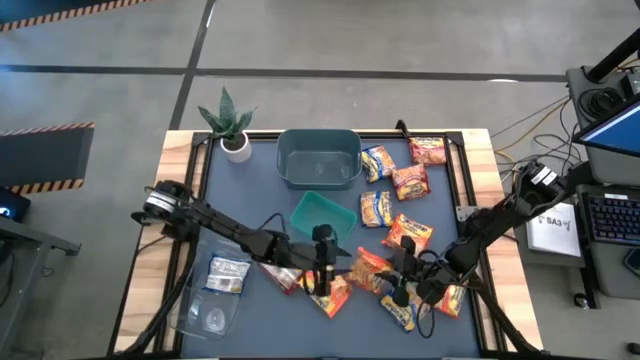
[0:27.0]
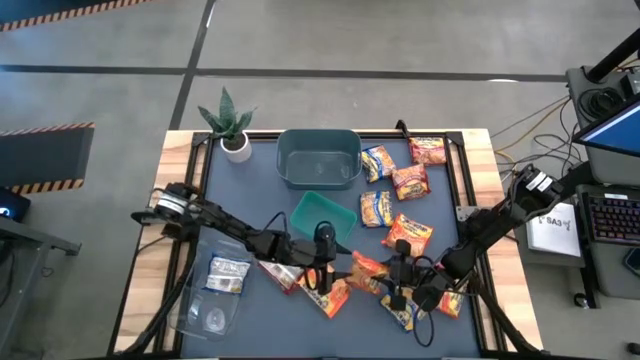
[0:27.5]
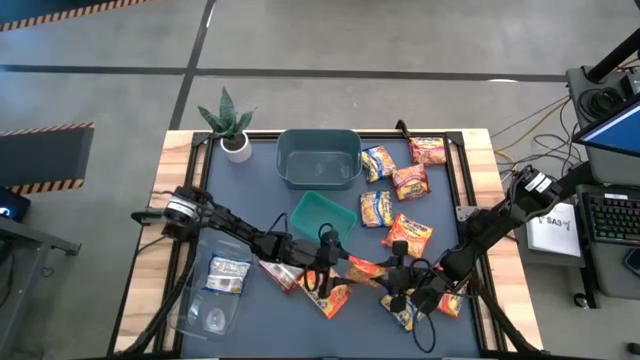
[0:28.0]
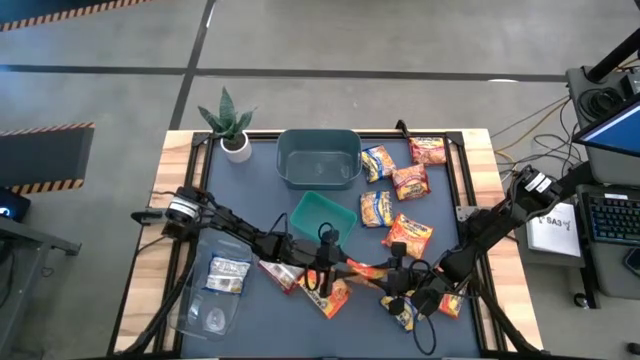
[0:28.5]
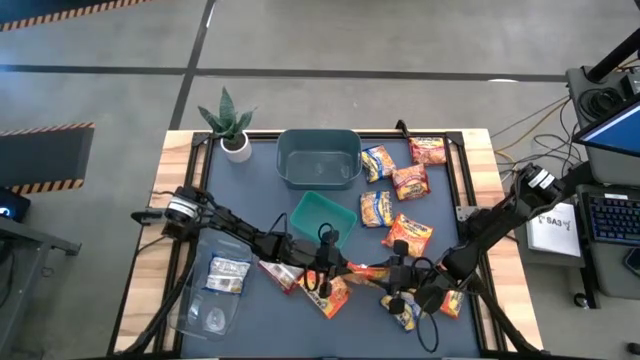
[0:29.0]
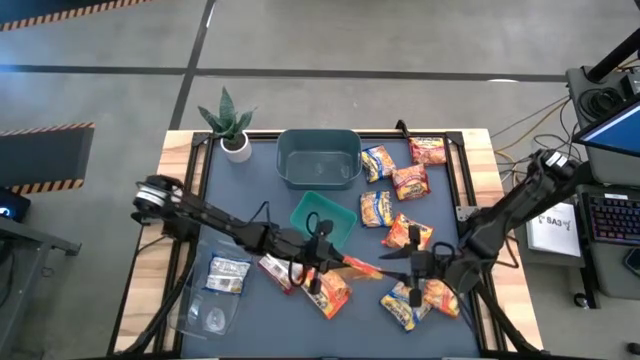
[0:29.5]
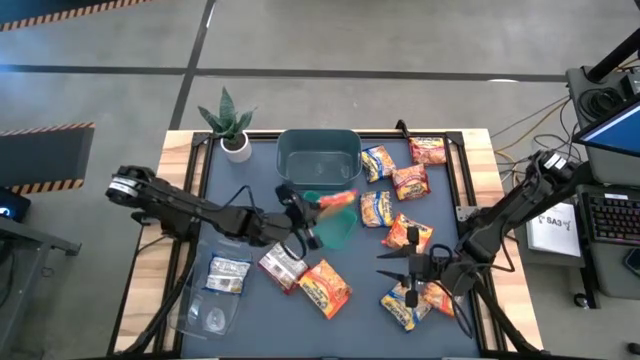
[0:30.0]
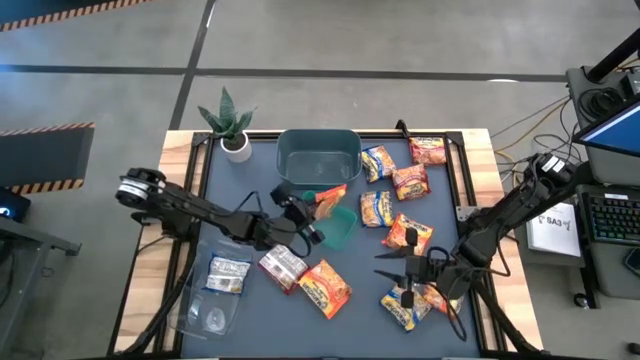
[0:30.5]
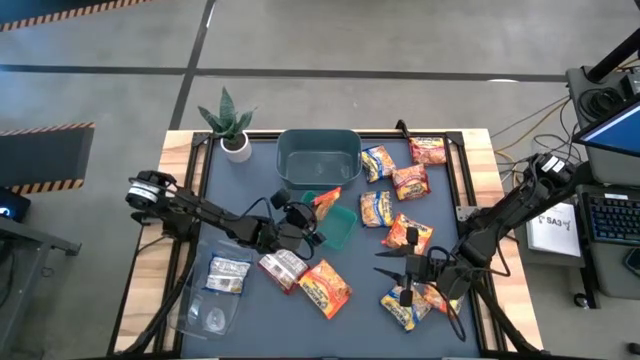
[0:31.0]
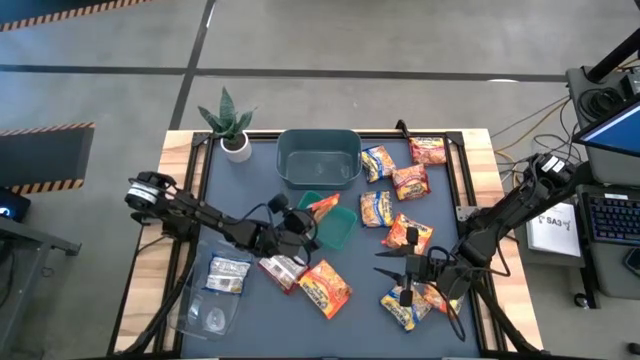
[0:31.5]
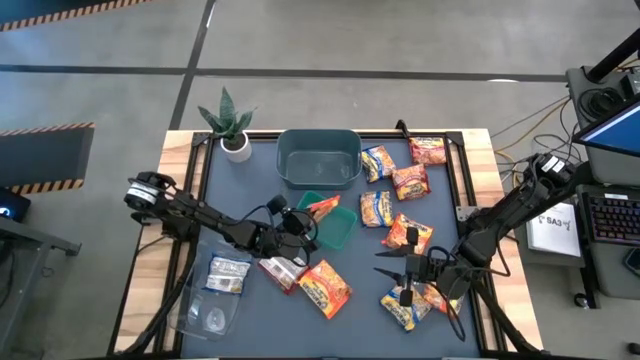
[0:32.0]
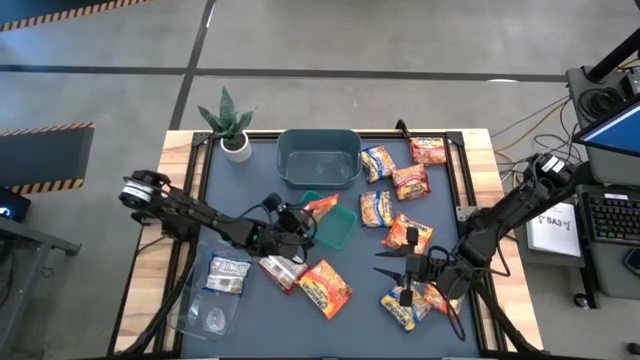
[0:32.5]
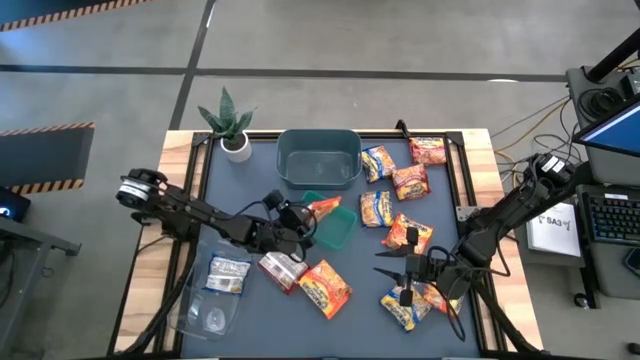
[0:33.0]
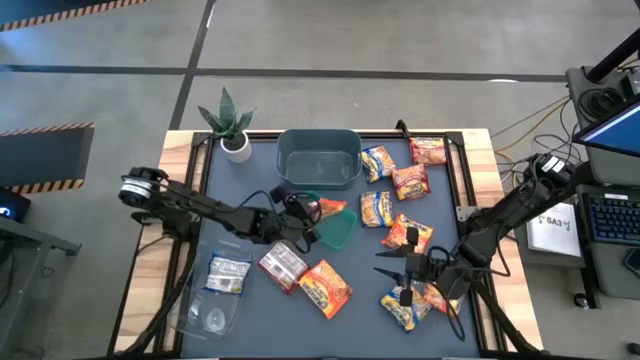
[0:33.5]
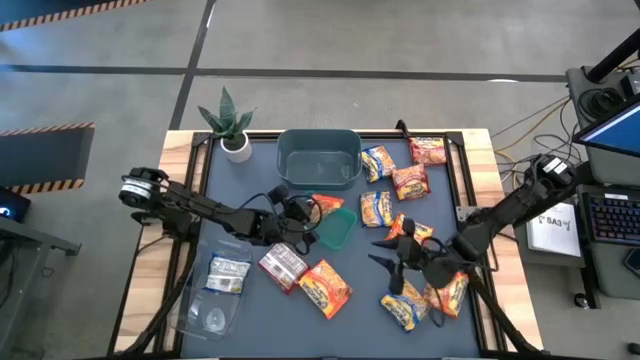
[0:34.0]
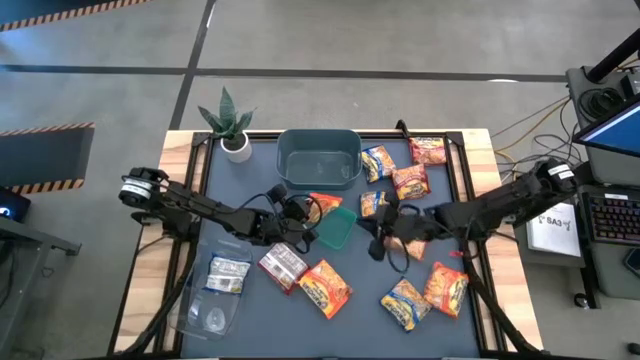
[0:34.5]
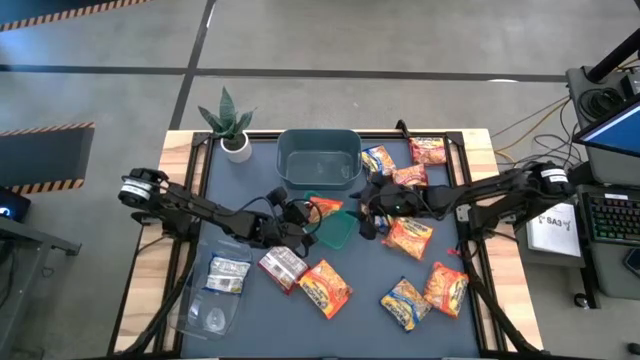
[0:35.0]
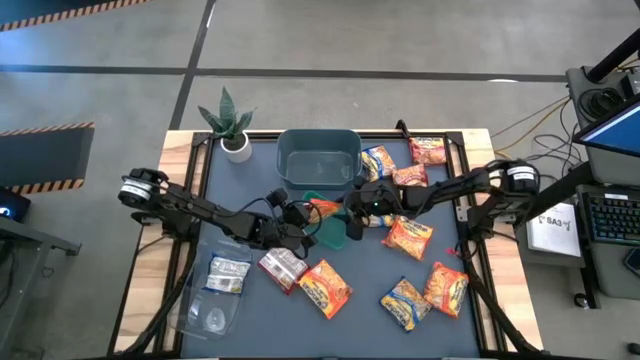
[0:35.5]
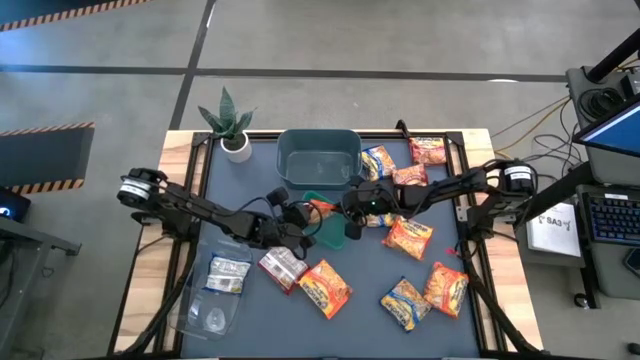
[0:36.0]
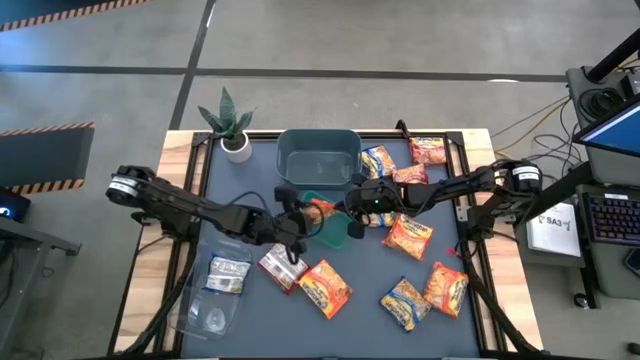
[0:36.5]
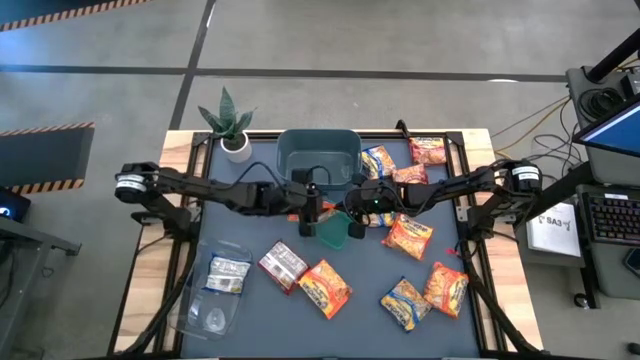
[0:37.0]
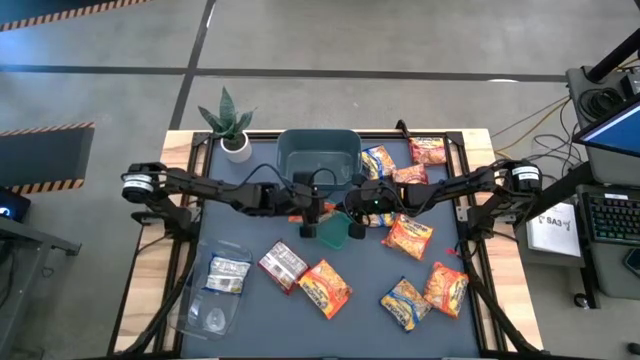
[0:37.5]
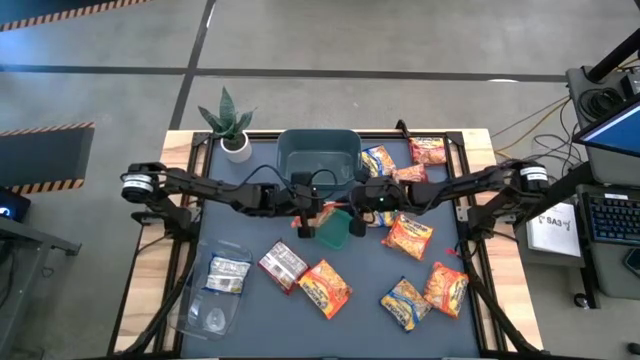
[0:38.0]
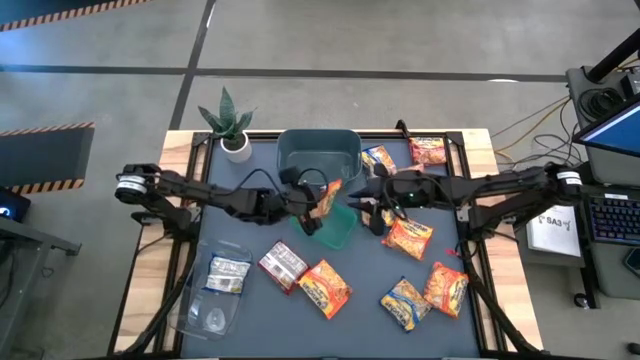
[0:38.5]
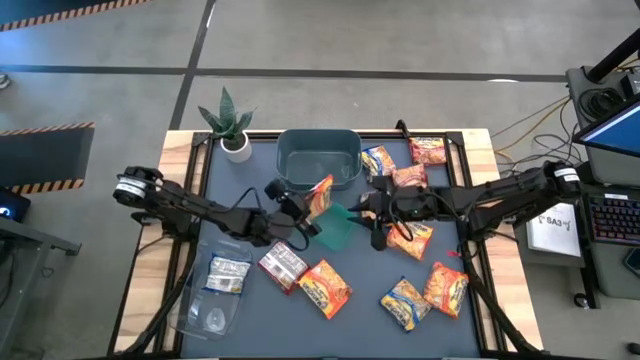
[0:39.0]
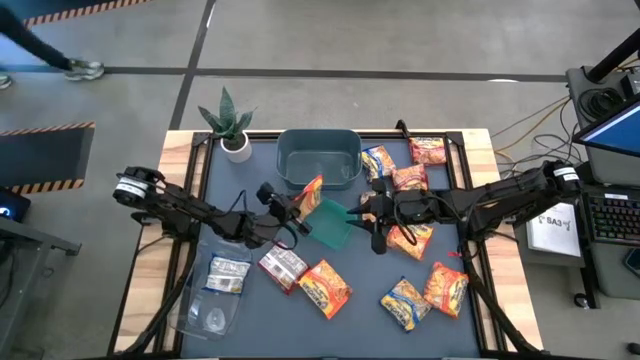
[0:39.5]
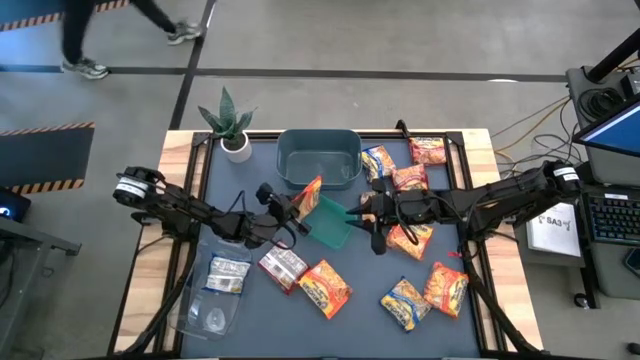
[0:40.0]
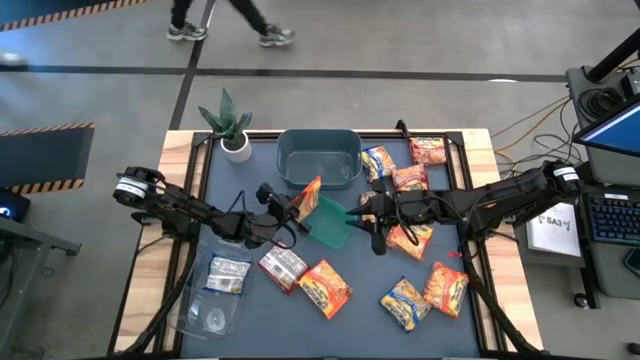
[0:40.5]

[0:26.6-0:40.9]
Task: Sort Maruchan noodles
Put the orange noodle pack into the green bin

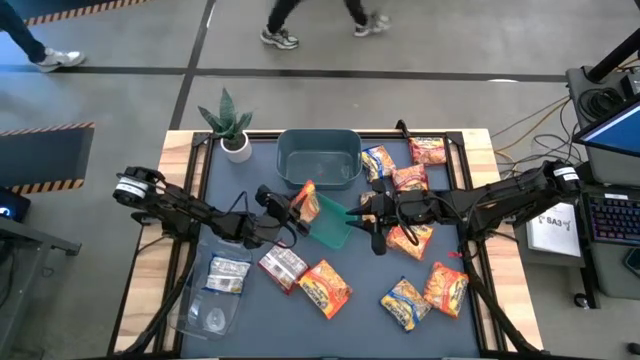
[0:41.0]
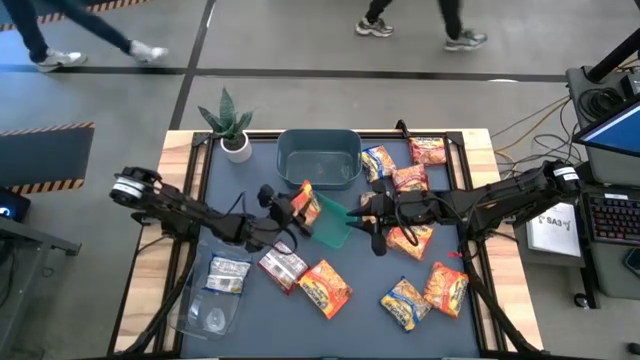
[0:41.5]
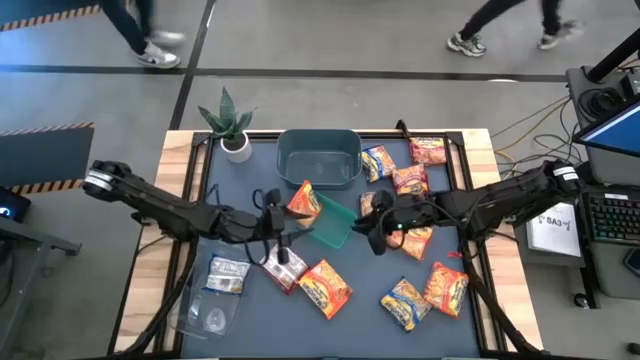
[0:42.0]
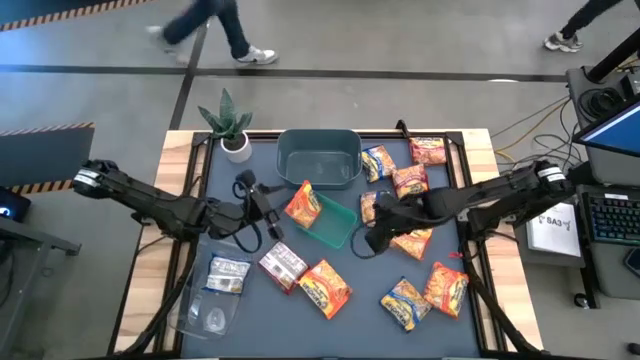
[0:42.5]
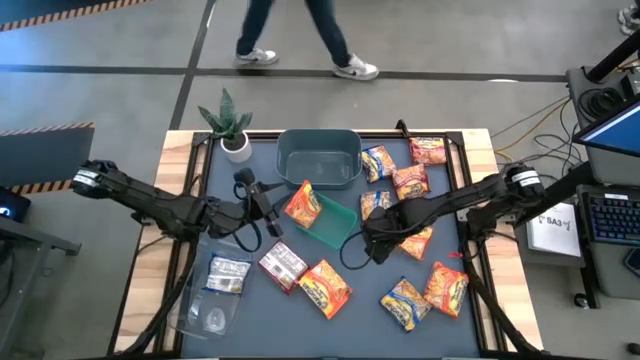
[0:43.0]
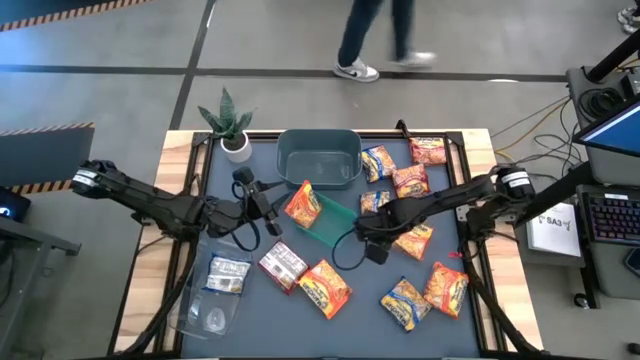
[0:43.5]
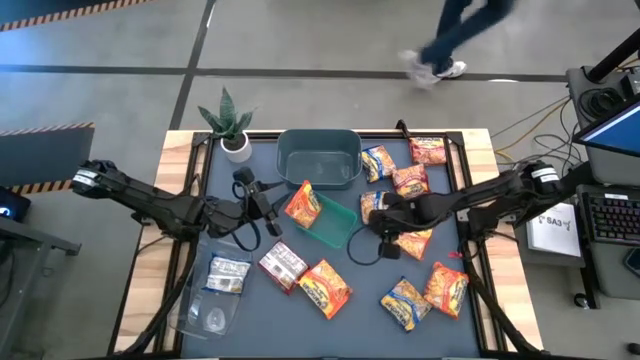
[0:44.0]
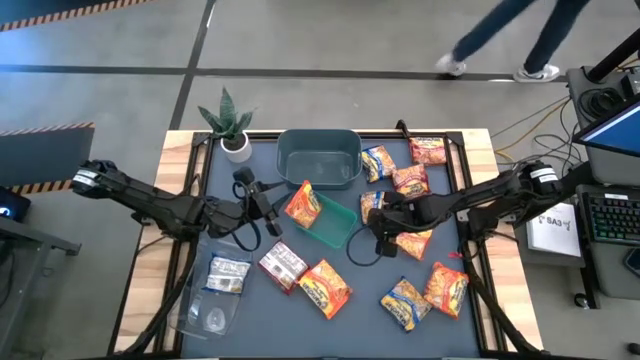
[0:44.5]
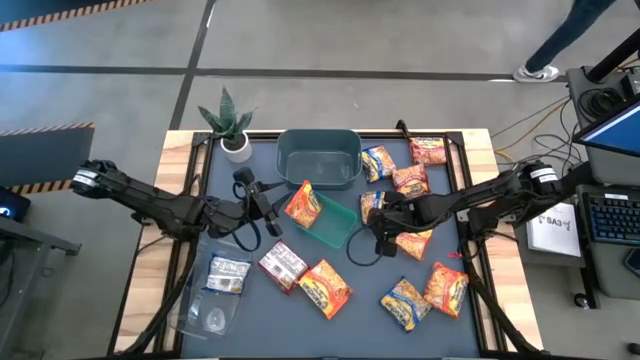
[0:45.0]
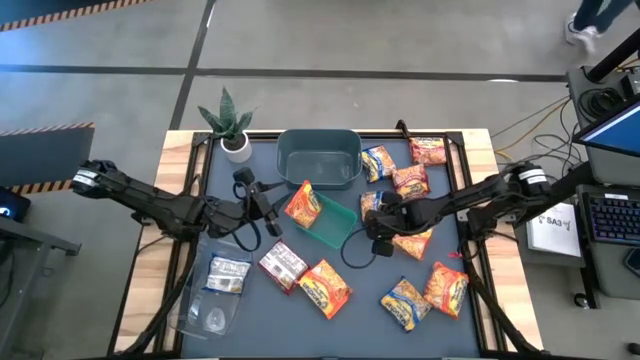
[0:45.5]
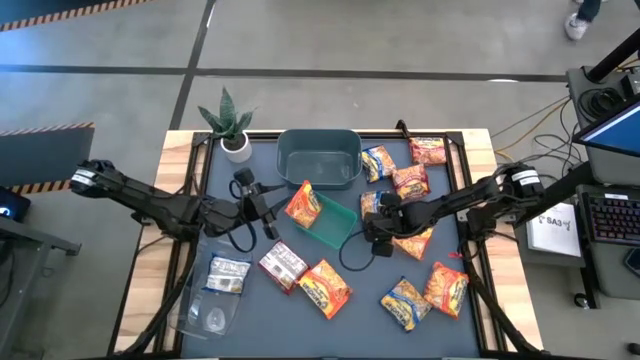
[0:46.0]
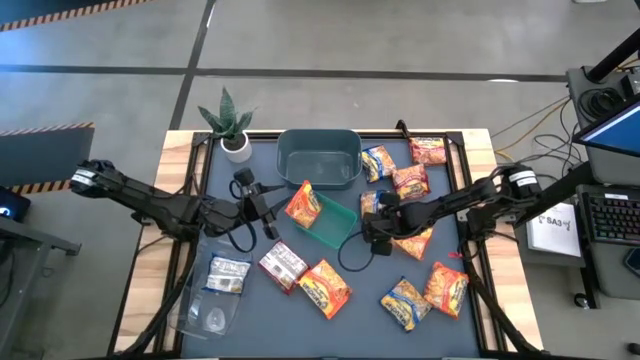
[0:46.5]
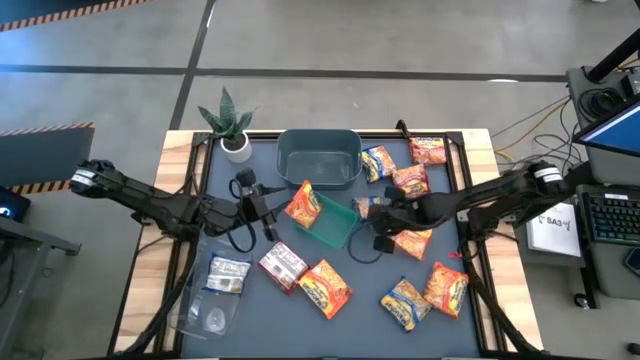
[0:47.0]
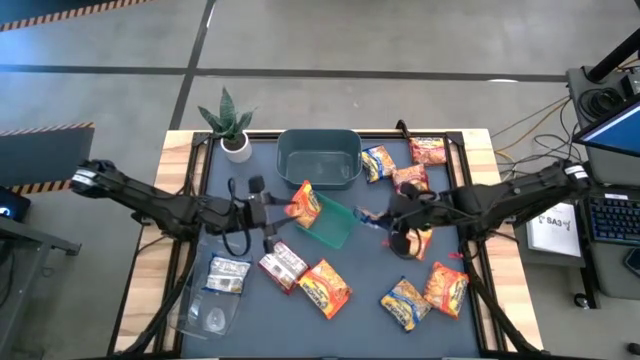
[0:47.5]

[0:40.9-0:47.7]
Put the blue noodle pack into the transparent bin
